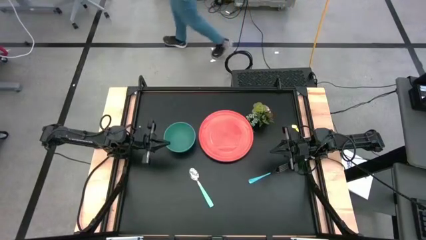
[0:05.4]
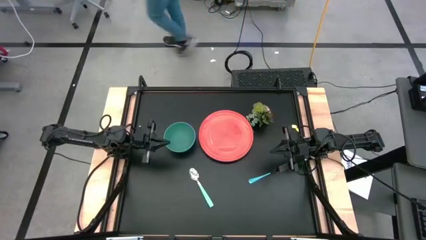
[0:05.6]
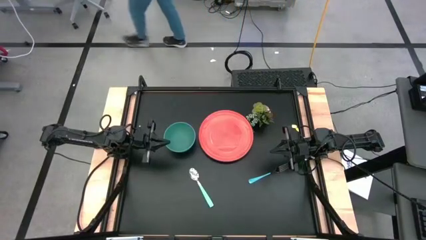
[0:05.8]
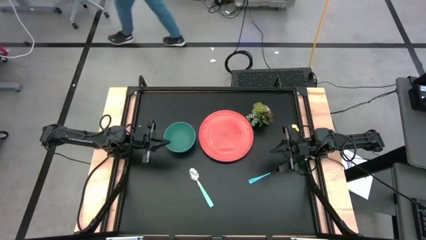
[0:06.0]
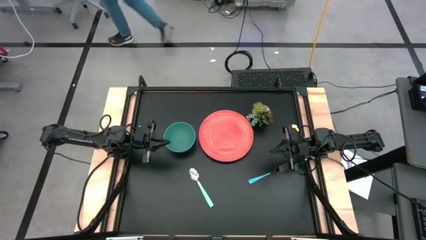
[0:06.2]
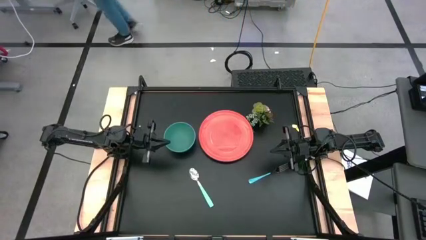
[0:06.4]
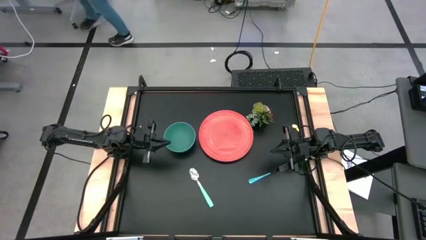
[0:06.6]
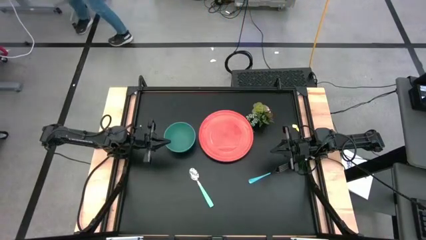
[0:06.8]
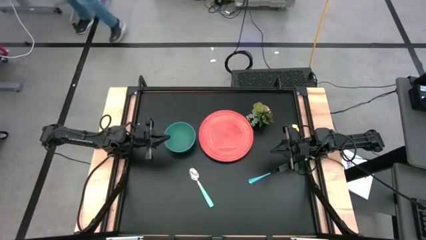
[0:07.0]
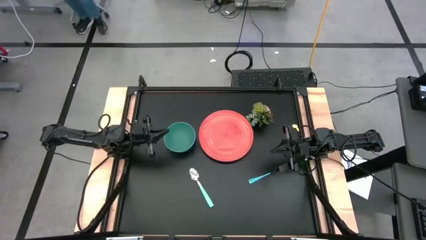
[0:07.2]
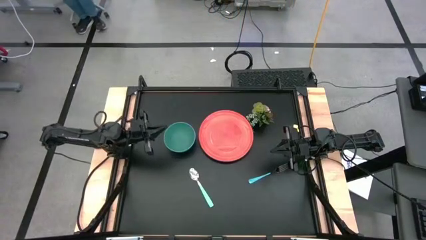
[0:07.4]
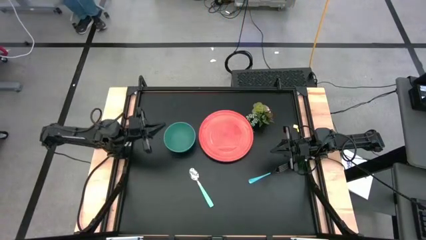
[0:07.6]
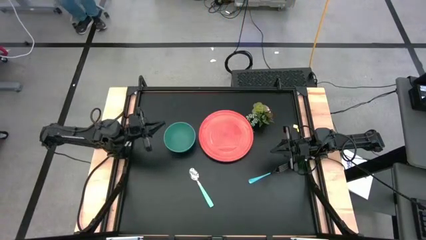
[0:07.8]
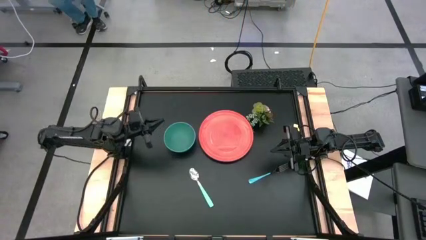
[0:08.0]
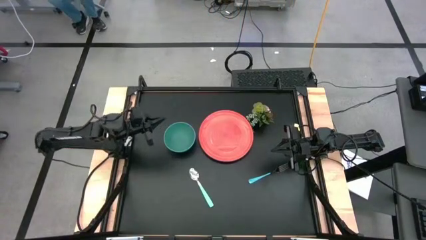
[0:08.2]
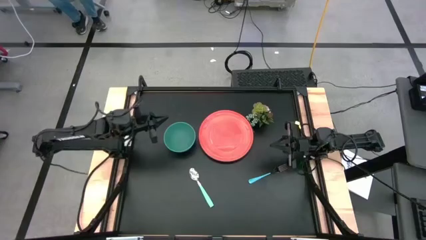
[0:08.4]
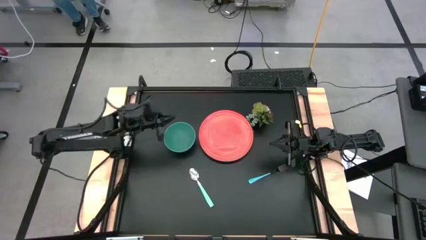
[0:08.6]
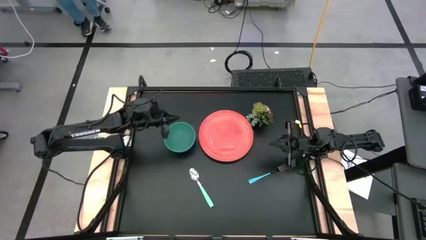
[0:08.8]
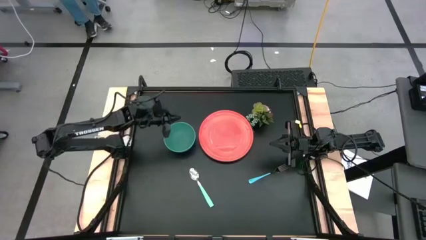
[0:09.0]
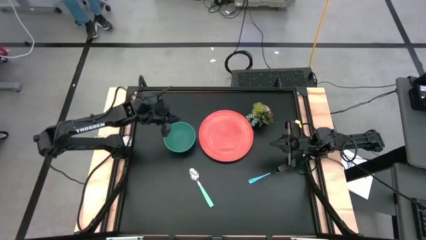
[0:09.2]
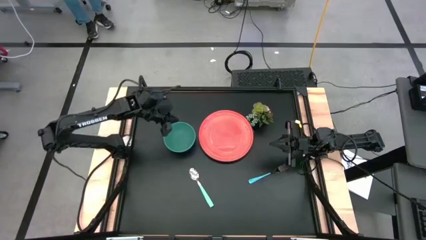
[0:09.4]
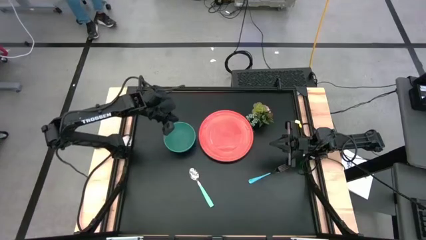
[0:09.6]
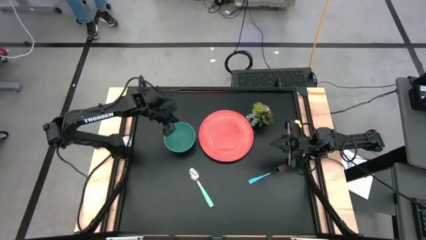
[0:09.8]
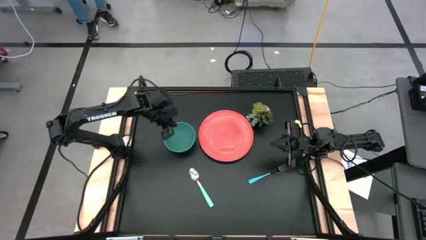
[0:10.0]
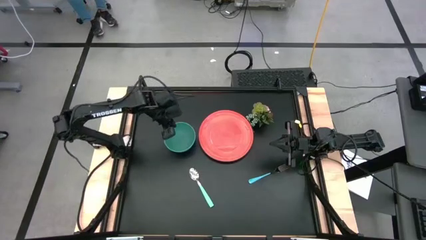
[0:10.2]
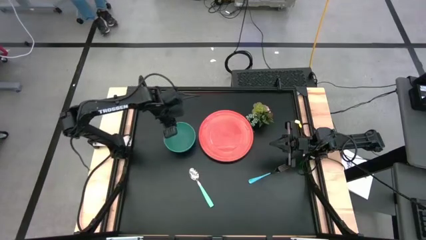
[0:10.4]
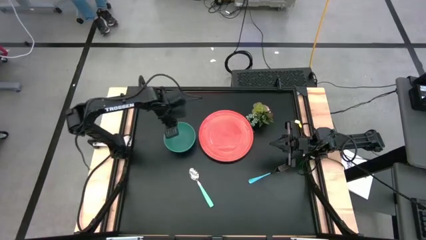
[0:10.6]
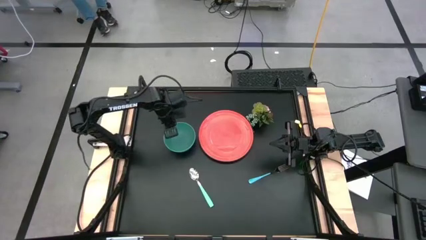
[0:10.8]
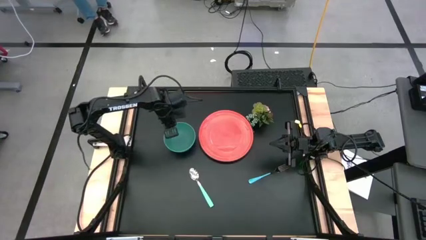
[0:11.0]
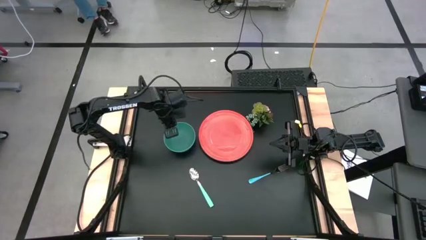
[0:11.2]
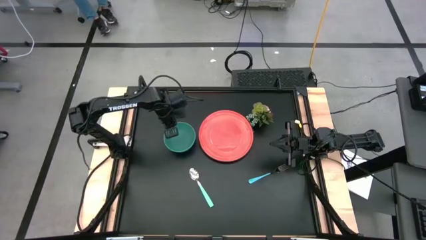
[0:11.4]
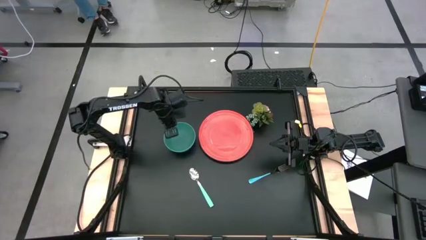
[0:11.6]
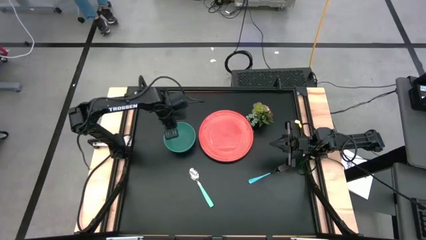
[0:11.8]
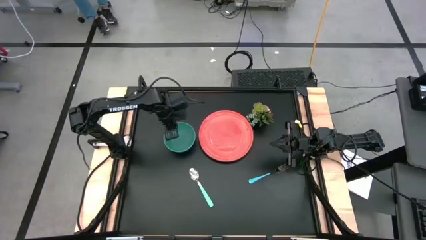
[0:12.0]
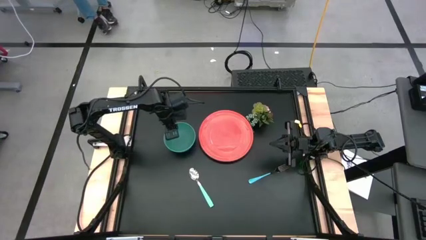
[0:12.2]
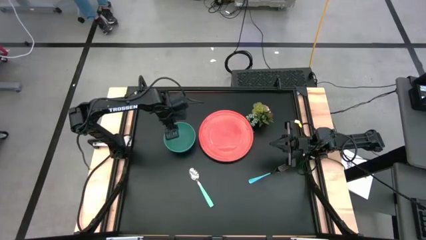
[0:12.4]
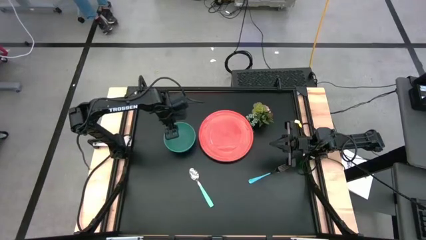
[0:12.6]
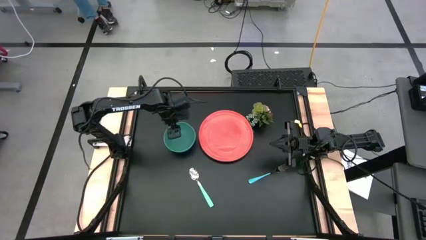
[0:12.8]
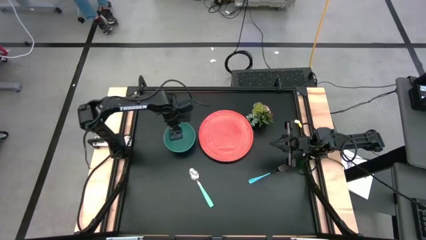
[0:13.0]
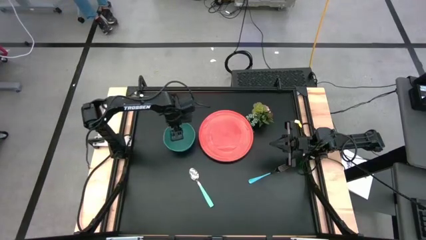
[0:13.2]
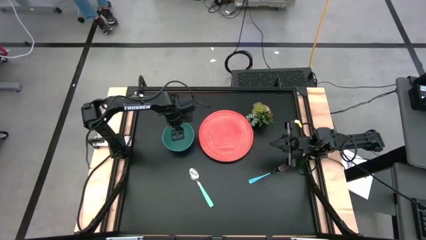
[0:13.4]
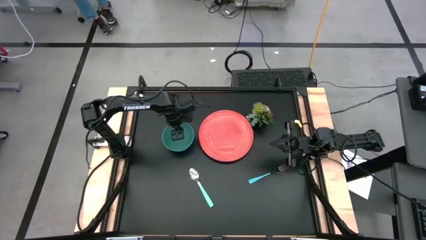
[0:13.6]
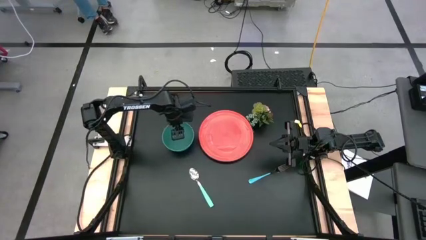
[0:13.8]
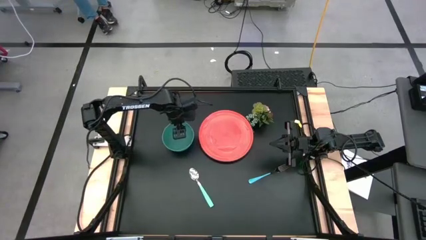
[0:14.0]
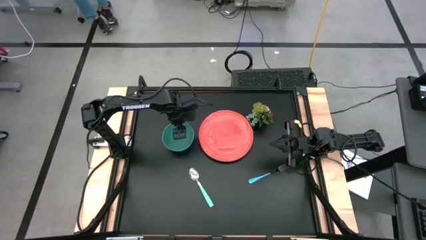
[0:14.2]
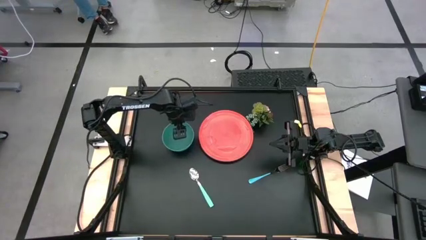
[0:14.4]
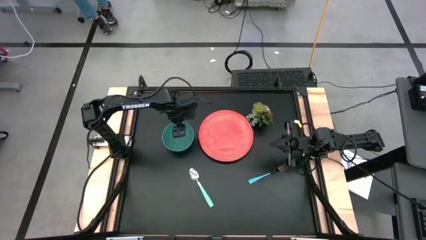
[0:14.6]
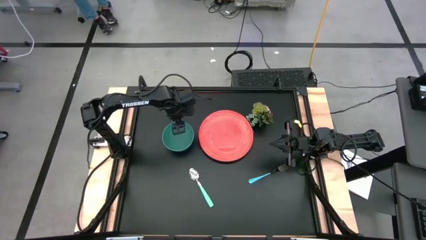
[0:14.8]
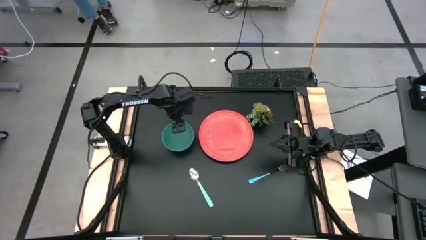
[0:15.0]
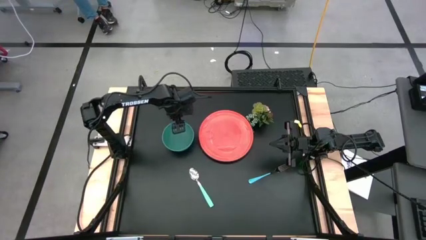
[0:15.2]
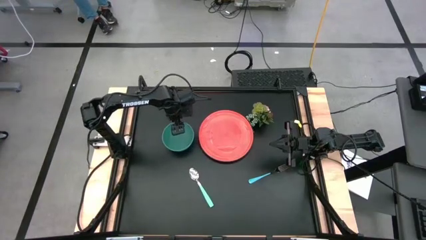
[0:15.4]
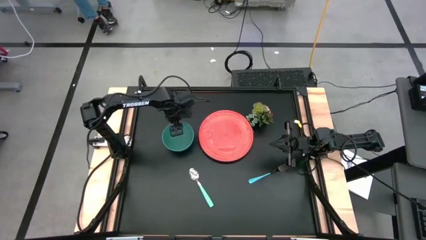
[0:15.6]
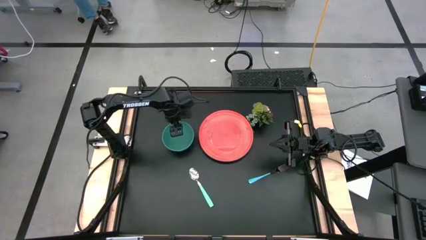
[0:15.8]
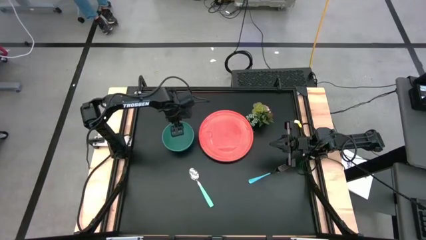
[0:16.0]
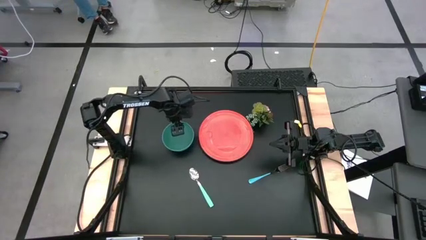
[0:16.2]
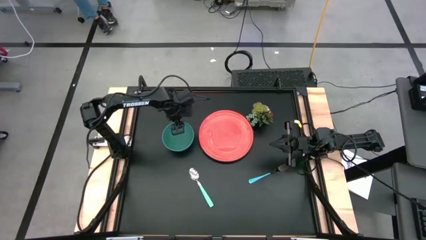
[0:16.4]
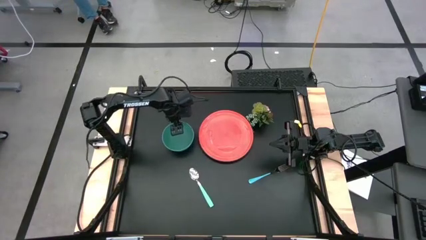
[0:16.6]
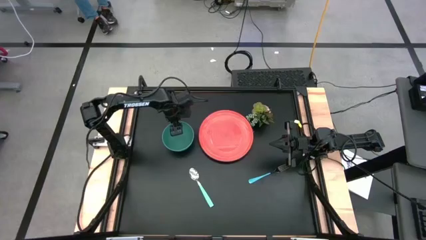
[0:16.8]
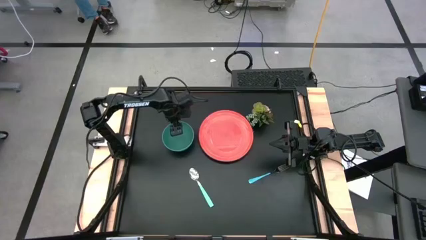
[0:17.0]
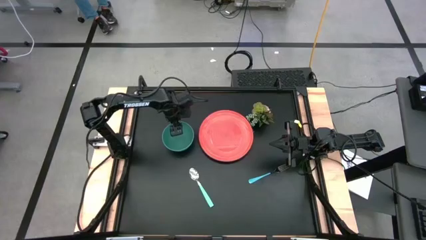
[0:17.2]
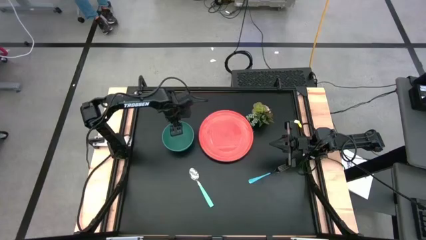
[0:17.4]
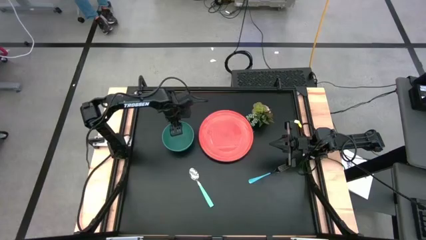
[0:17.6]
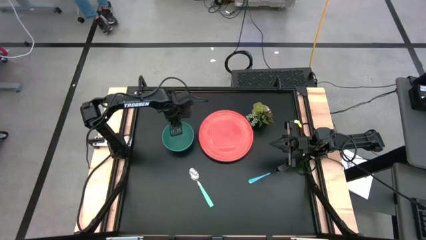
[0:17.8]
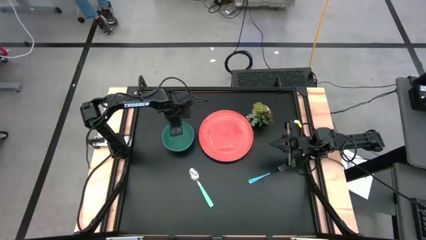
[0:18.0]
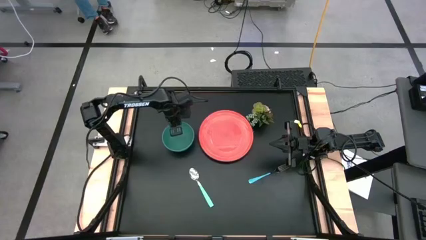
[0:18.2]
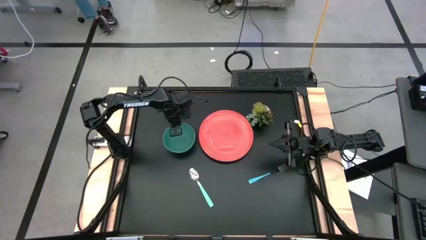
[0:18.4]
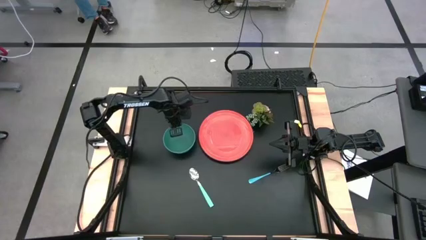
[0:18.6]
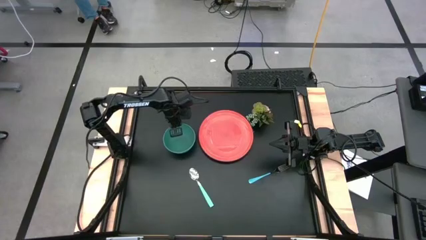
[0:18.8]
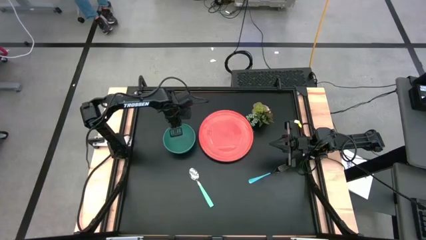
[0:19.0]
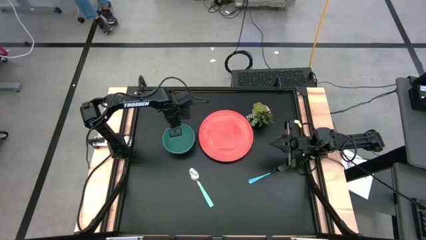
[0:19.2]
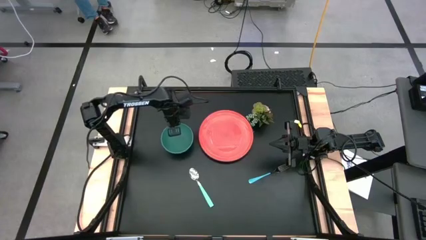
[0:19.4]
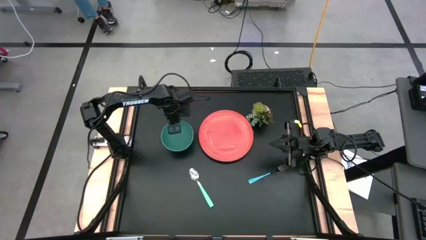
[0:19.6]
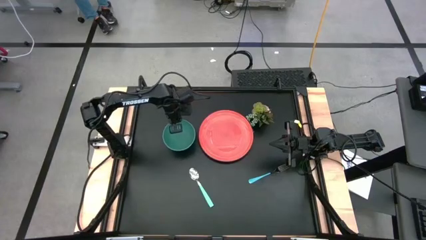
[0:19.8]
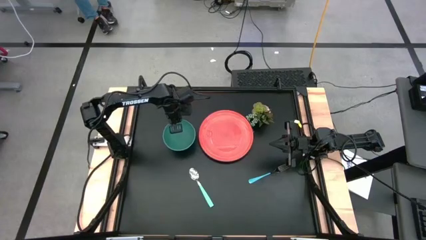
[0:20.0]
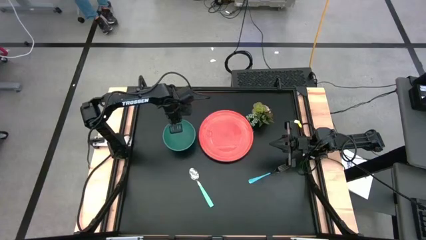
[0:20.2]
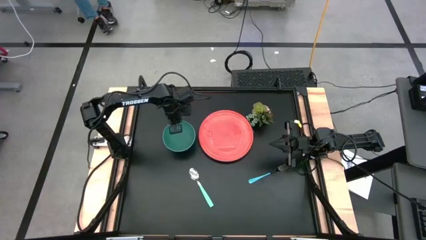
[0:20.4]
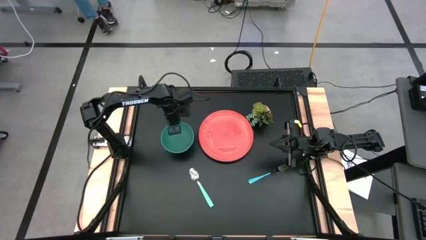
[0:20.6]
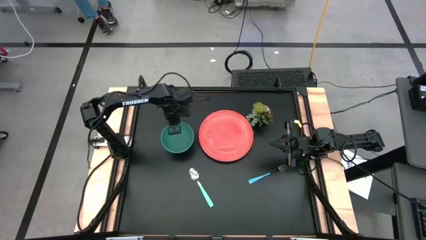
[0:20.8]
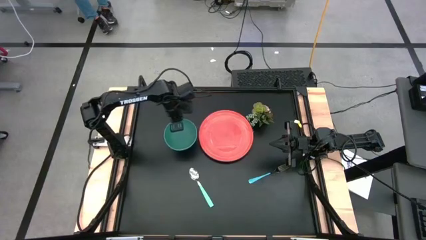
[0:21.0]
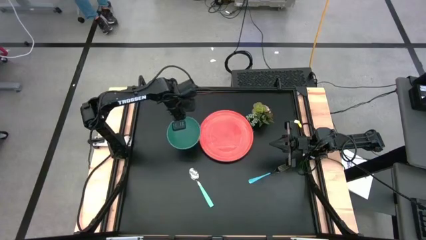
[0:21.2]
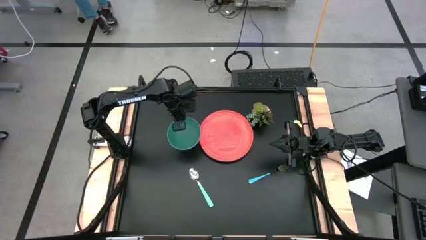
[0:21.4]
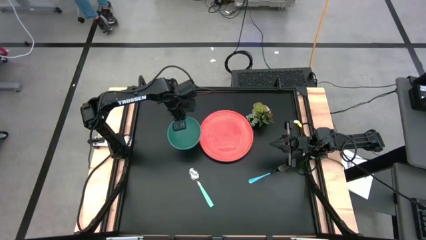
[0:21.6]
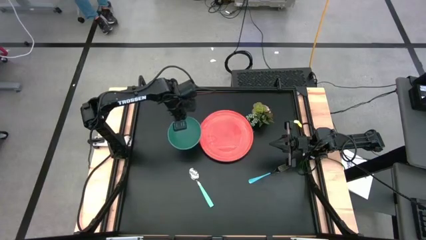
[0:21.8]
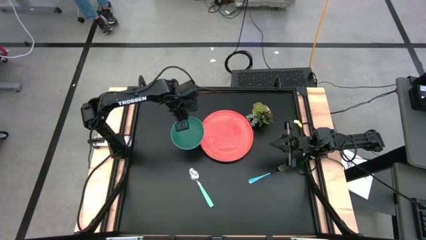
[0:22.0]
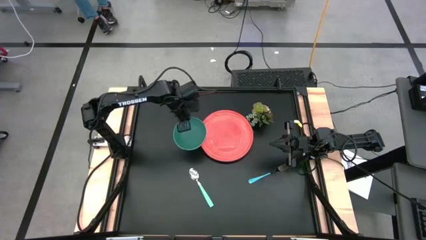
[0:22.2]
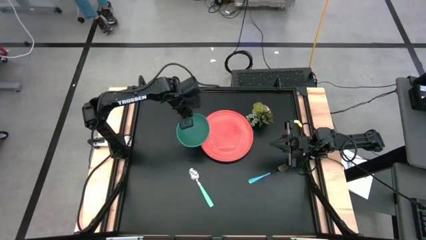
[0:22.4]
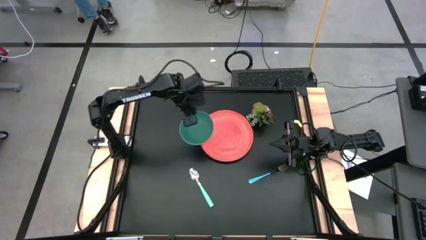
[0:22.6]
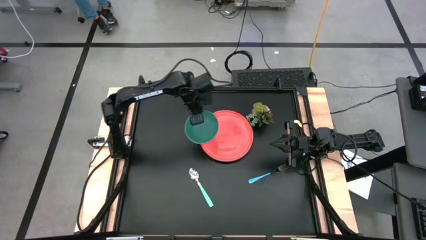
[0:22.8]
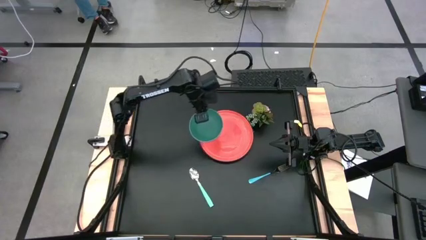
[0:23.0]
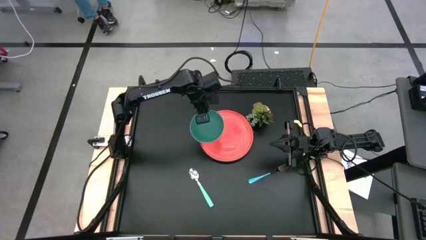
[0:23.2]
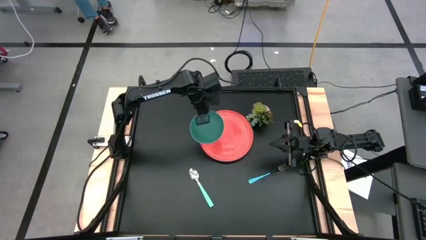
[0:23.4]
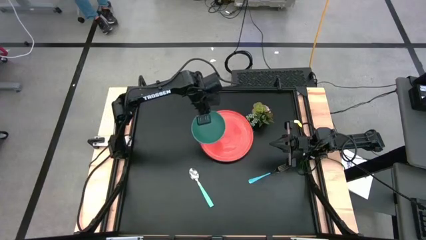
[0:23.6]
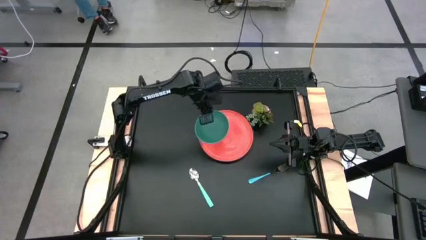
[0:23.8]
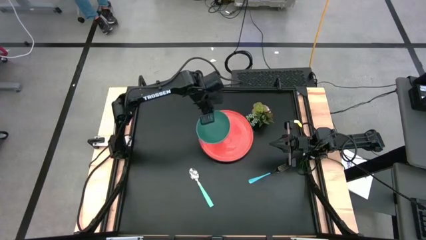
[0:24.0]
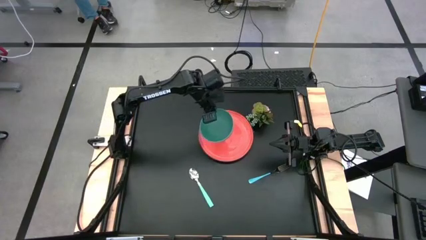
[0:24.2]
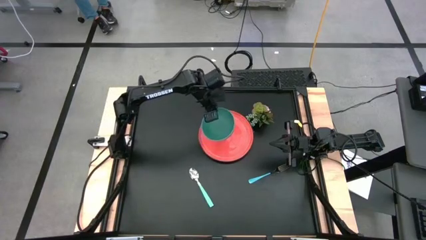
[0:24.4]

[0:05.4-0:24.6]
Task: Set table place
Stack the green bowl on the orange plate
